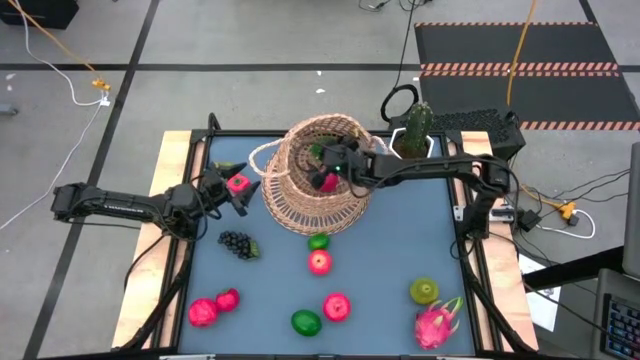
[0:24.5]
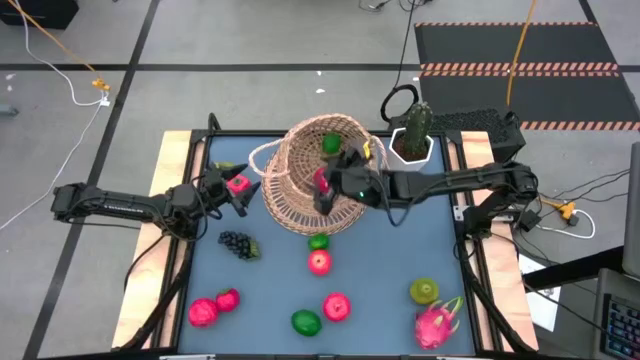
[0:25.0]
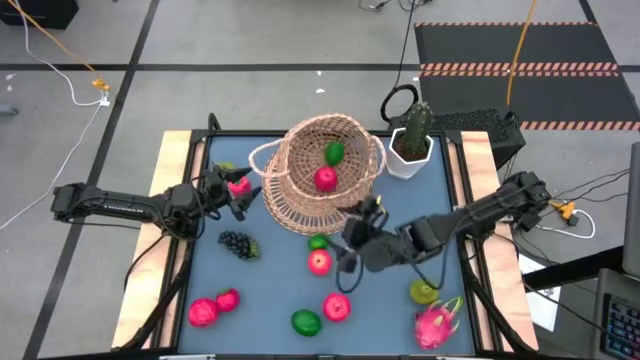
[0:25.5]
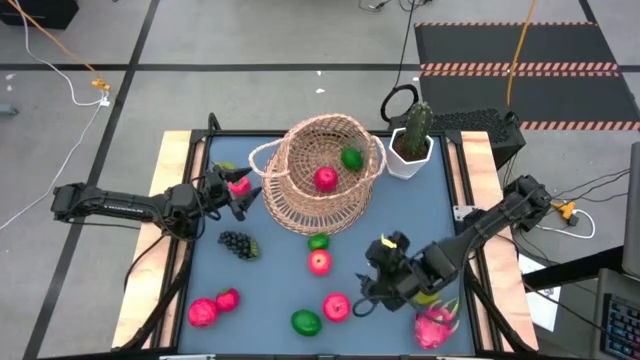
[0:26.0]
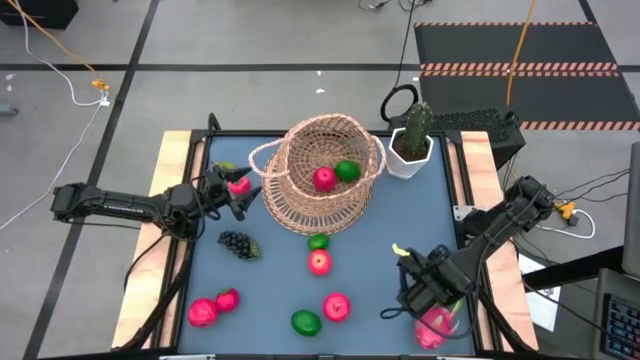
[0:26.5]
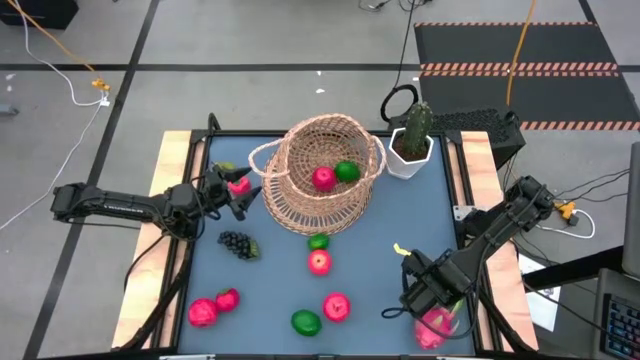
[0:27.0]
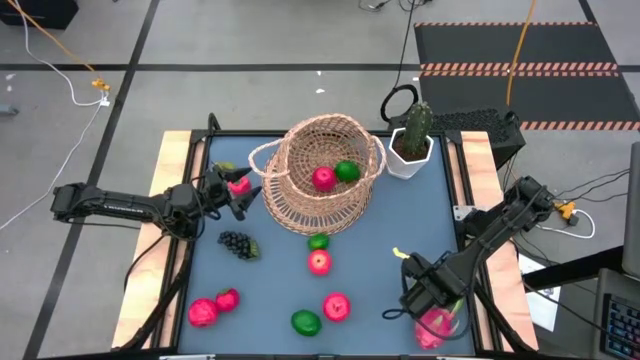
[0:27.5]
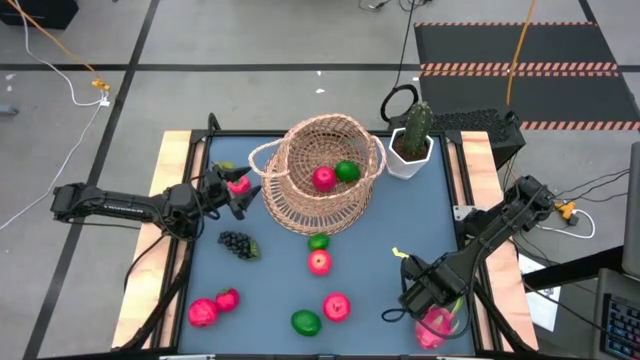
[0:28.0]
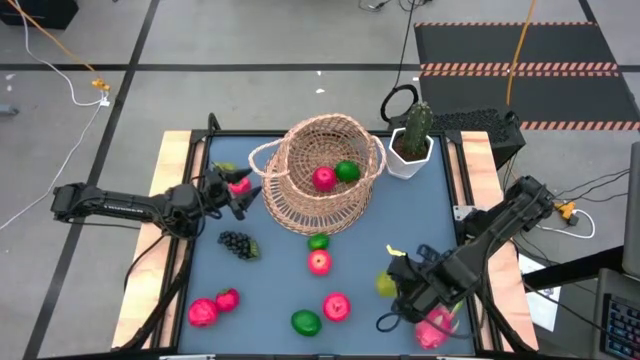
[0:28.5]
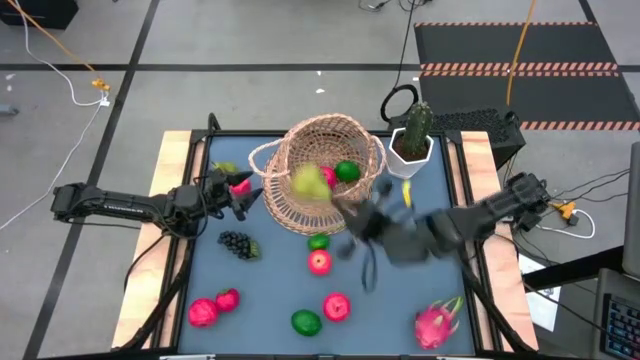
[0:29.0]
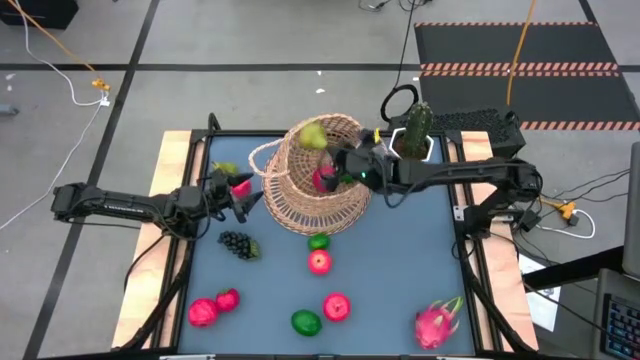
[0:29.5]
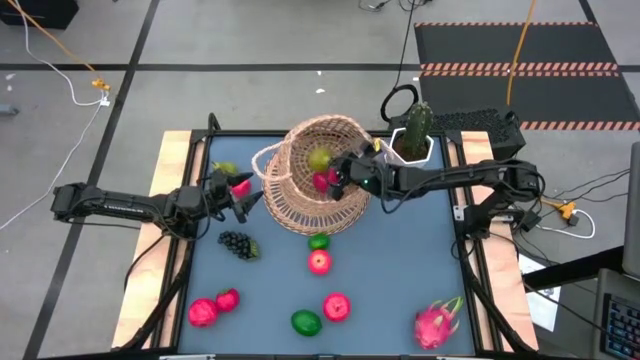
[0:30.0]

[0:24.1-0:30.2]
Task: Build produce basket
Put the bottom pear into the basket

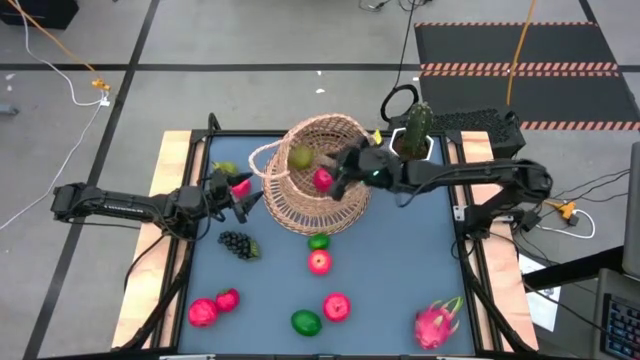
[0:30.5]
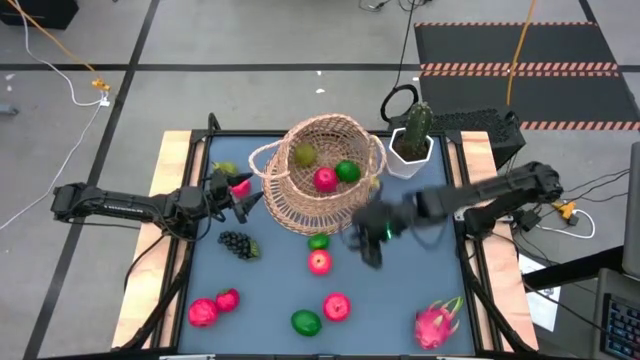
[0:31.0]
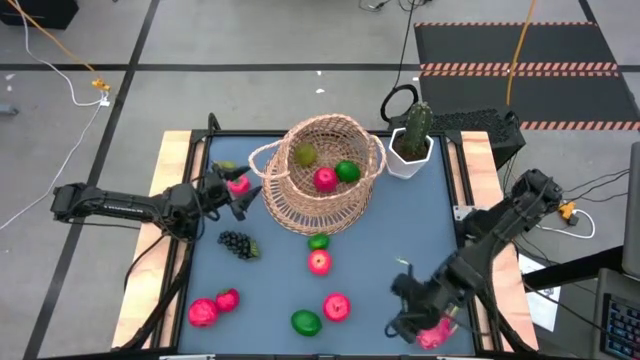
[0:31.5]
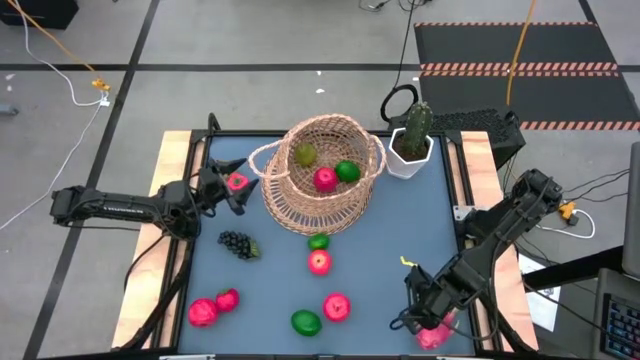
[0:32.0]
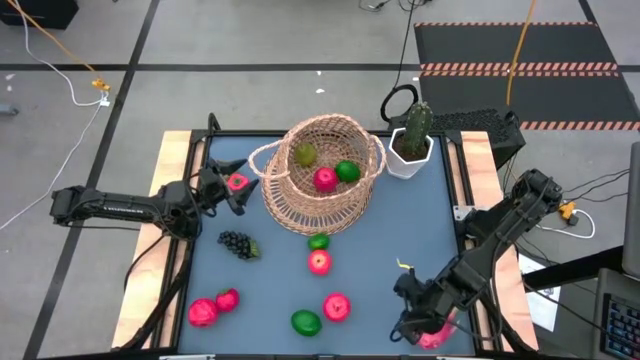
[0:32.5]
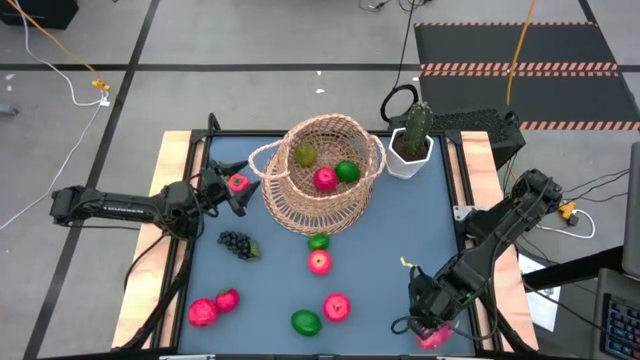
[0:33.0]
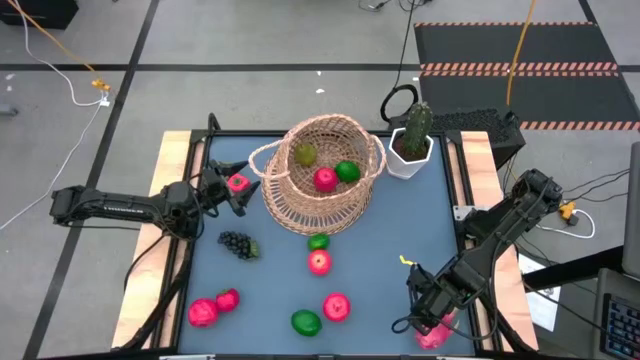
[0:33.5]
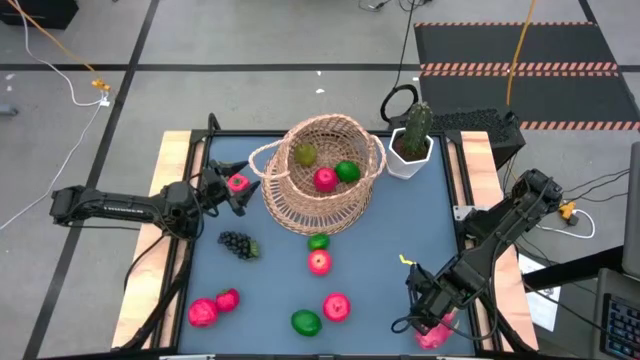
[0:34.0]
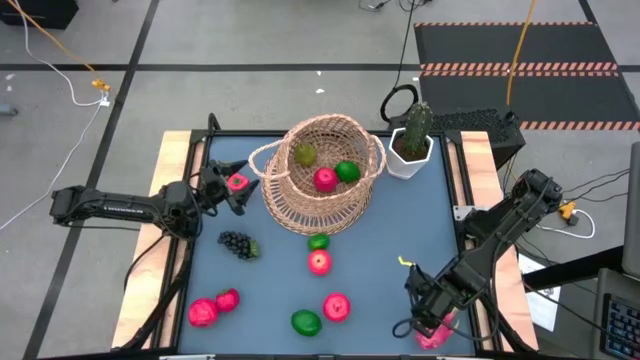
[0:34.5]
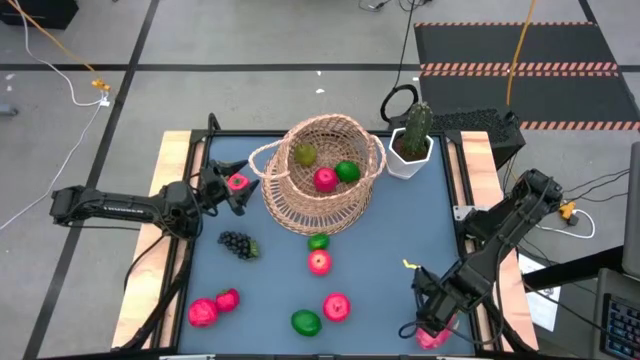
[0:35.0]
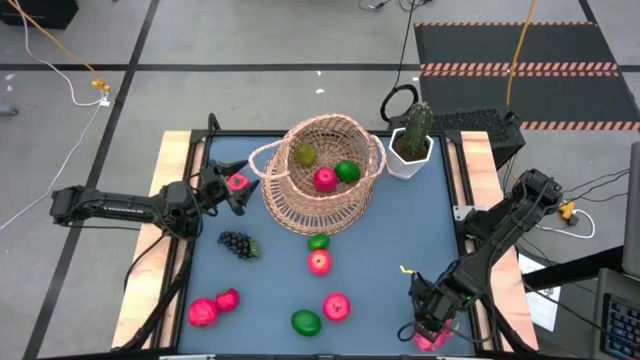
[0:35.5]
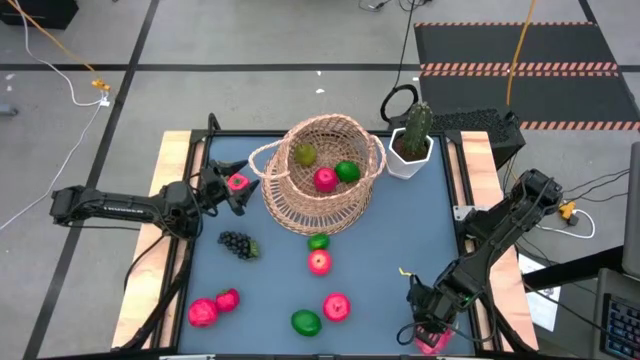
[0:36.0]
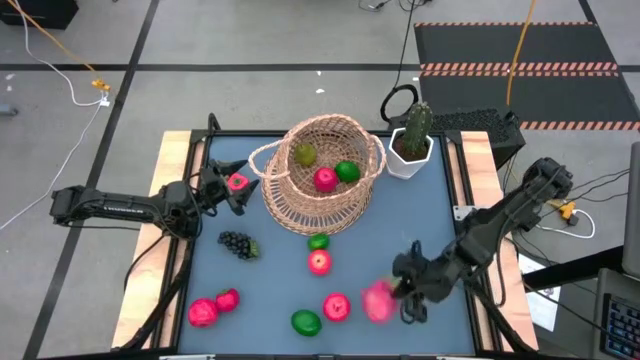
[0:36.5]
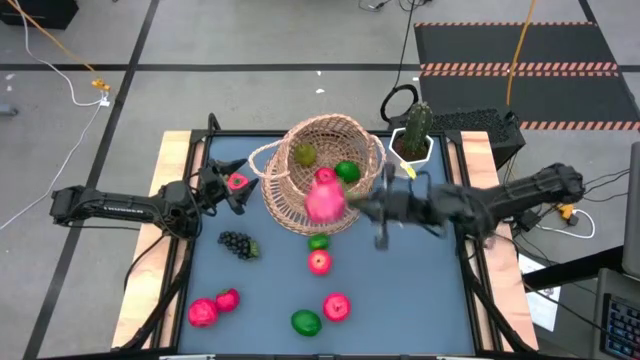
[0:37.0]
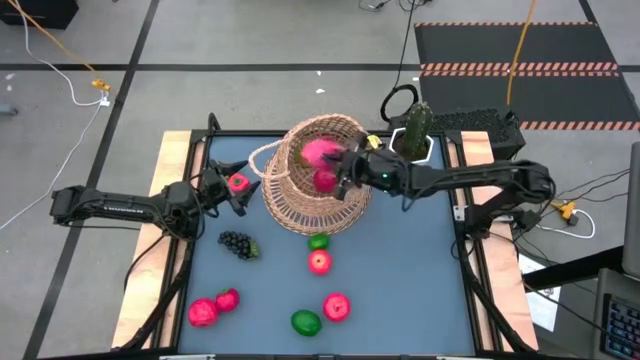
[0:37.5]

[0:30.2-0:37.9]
Put the dragon fruit into the basket

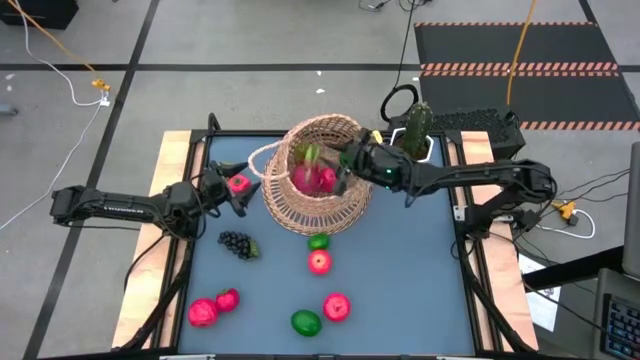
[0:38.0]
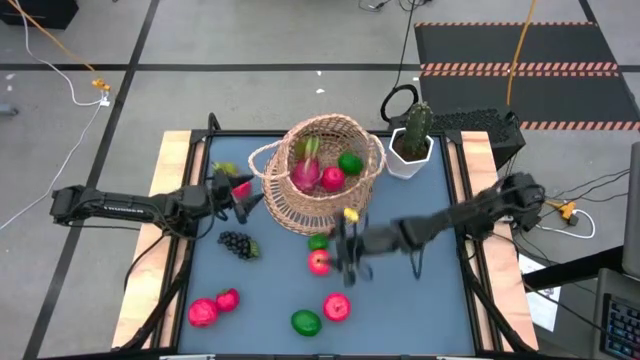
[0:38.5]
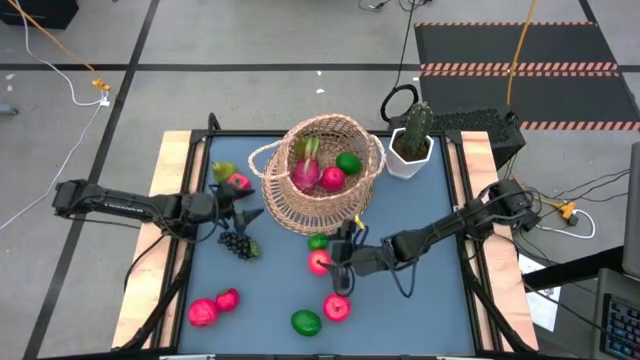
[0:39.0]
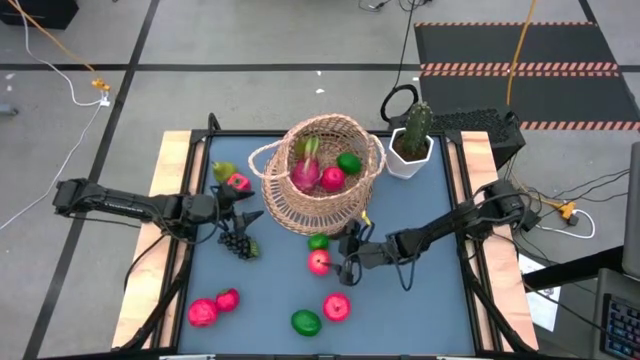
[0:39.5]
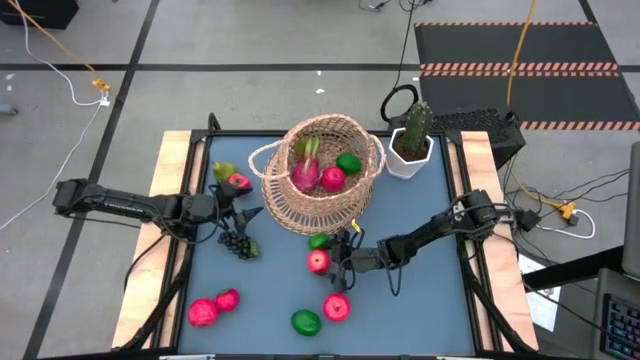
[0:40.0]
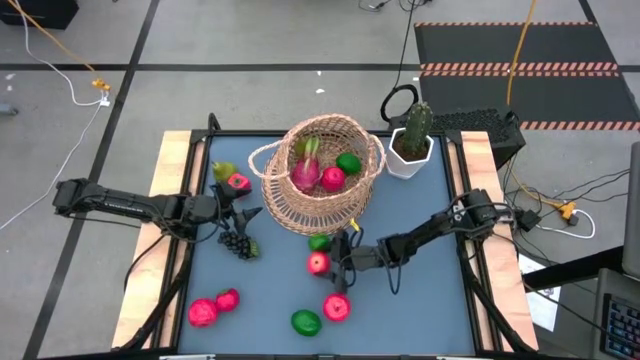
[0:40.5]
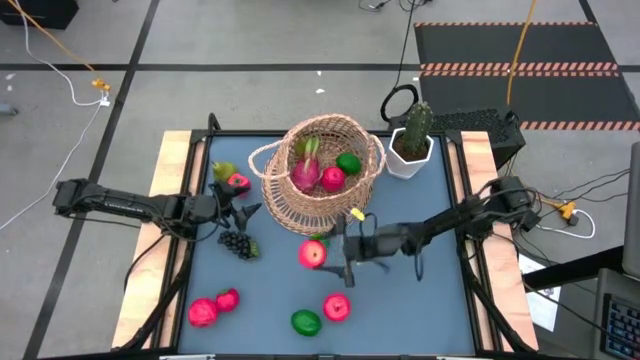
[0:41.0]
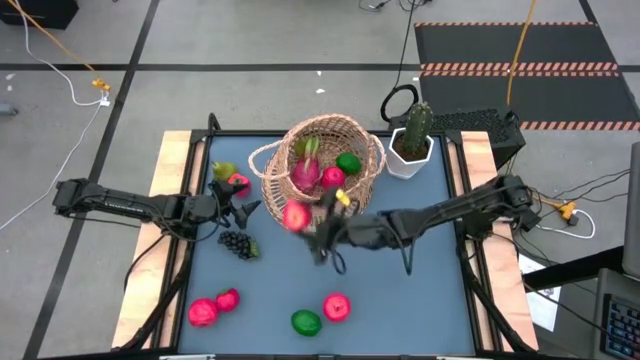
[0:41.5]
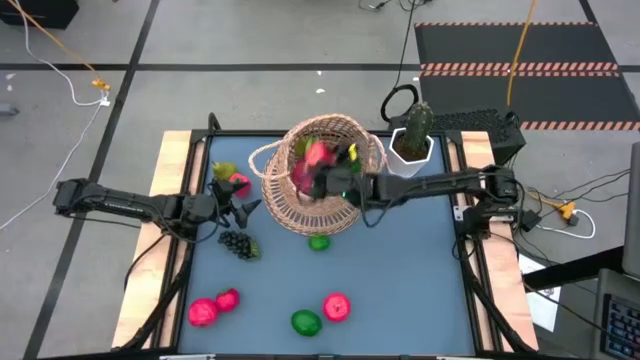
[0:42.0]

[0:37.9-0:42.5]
Put the top apple into the basket

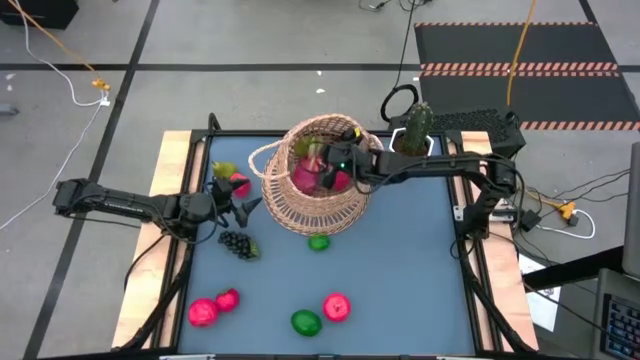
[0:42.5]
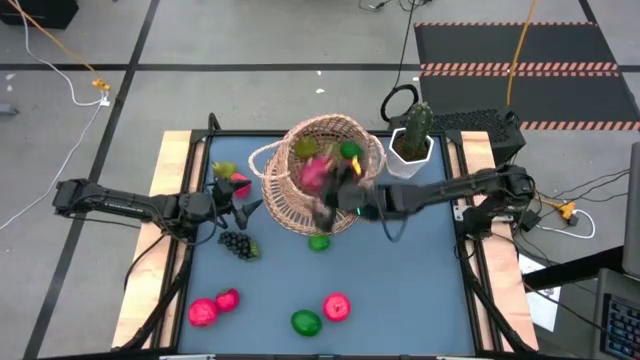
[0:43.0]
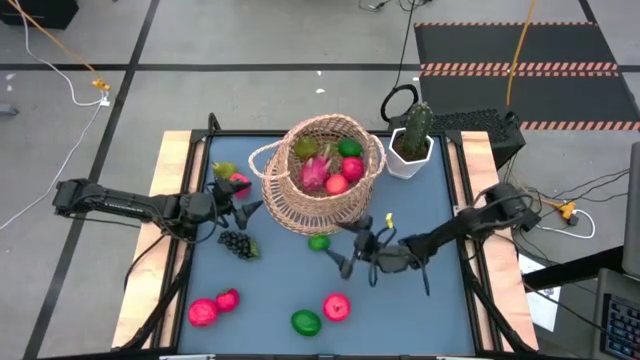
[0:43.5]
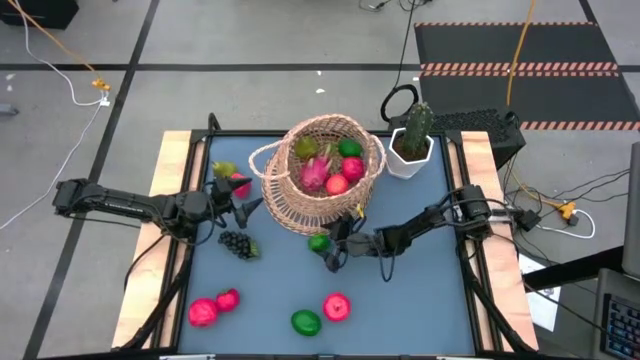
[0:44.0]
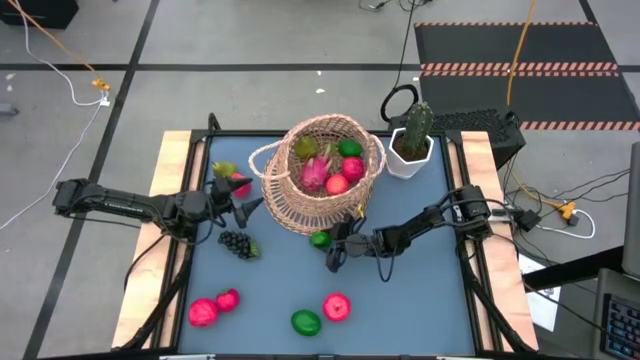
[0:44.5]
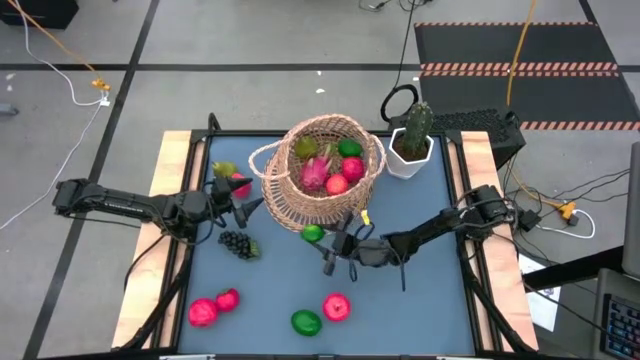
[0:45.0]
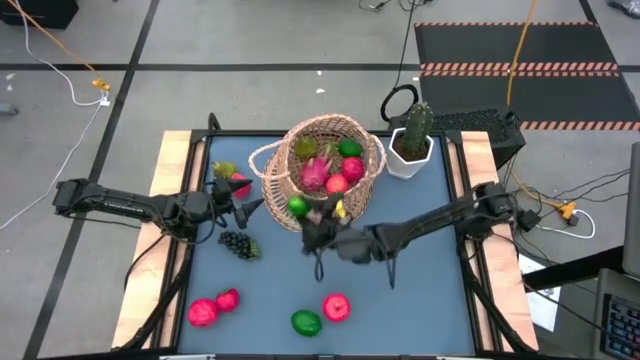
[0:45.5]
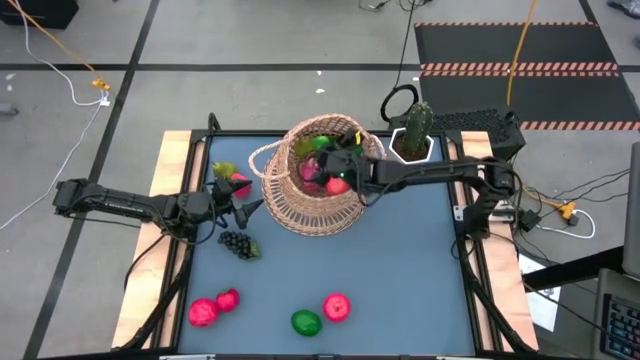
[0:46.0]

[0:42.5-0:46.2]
Put the top lime into the basket
